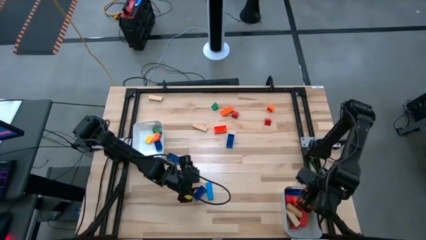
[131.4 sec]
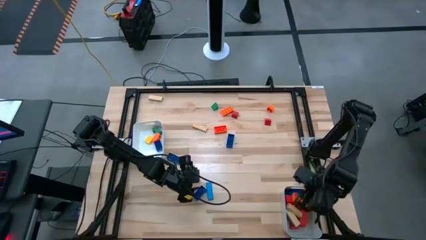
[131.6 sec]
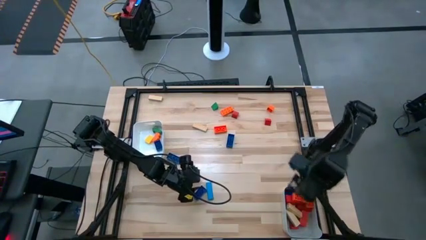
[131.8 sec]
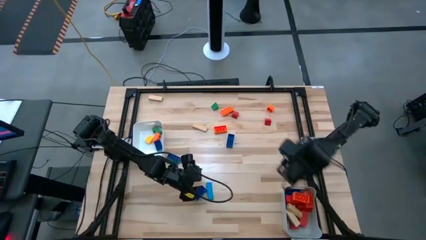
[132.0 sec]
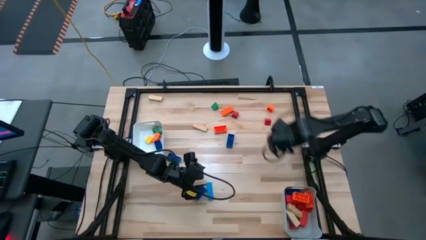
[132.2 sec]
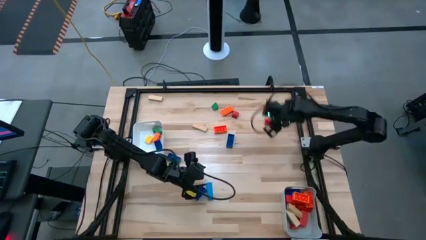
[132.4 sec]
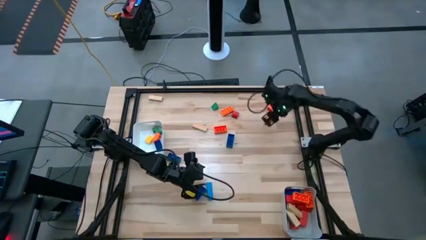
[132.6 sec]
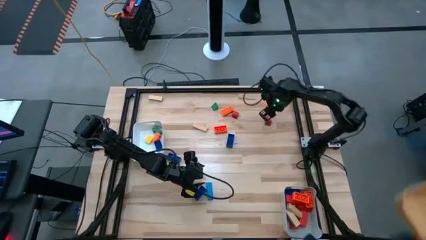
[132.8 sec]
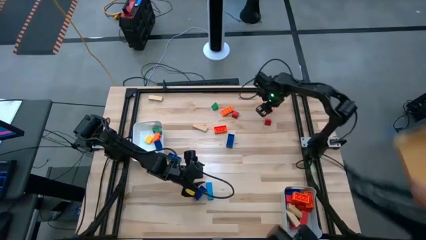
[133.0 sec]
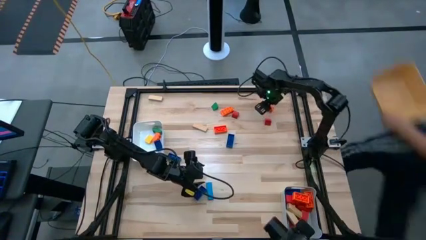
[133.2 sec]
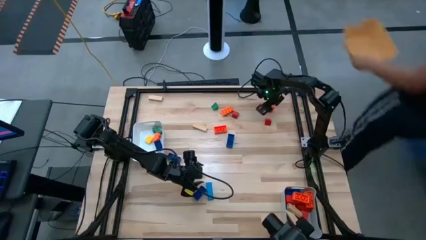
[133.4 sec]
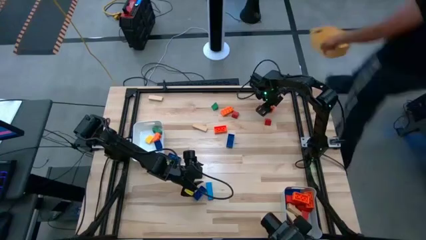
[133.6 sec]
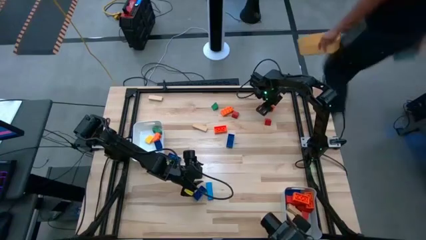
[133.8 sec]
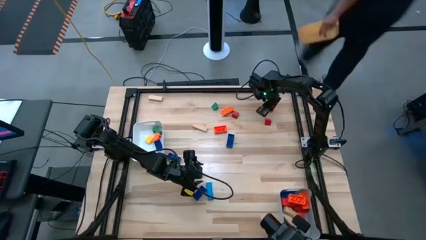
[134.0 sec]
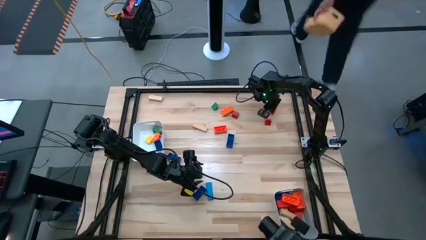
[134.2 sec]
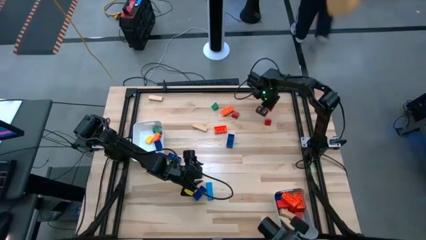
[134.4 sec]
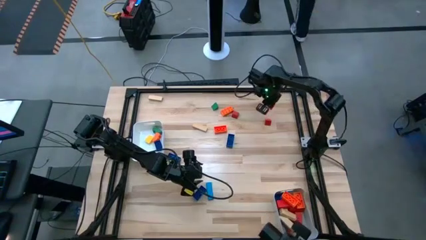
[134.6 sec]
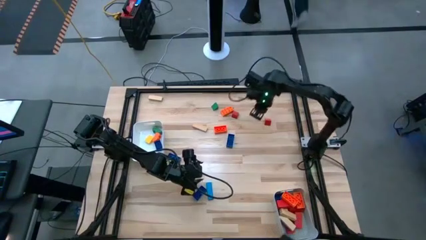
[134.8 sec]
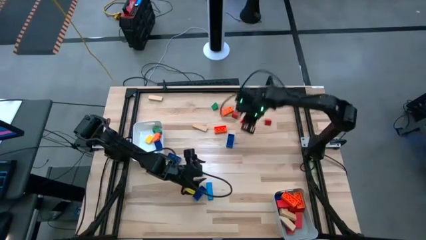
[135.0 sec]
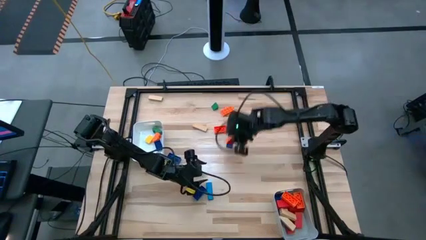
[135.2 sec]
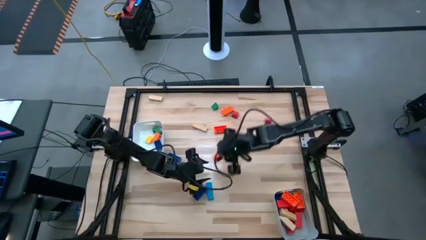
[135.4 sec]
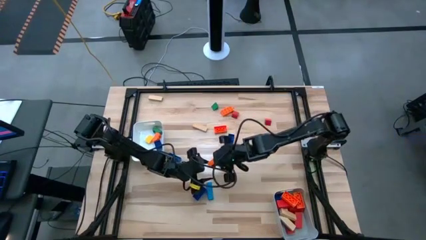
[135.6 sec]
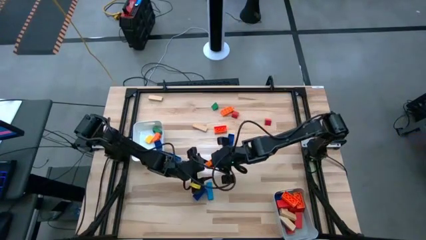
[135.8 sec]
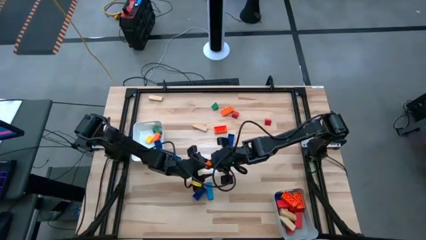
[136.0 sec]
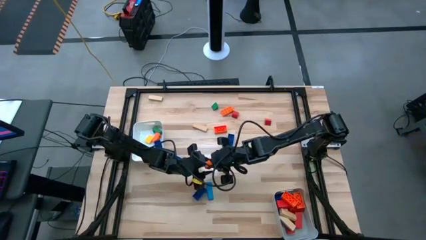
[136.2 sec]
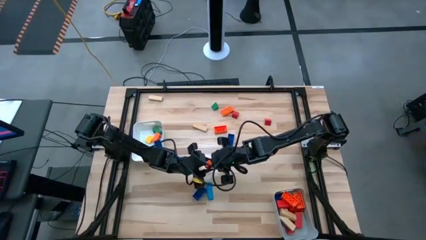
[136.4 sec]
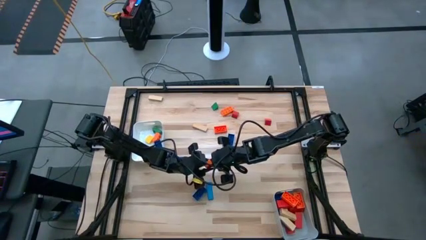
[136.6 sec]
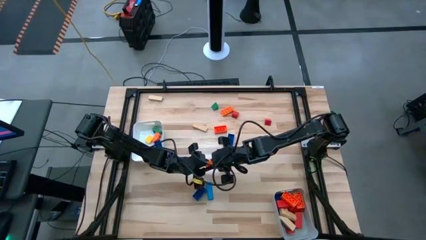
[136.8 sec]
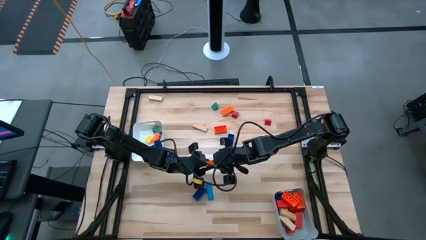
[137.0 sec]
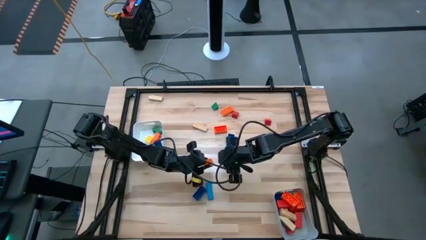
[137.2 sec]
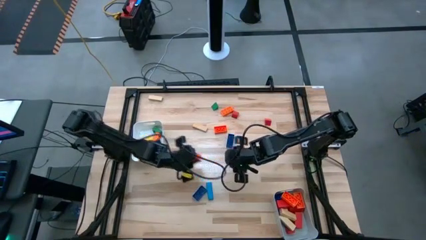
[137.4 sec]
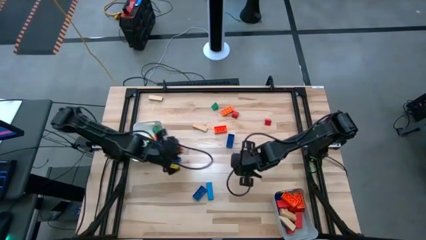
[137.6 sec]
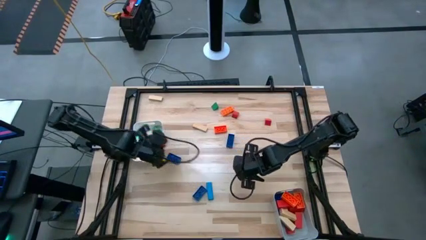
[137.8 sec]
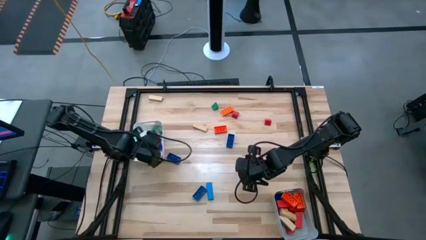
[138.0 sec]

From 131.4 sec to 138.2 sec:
Task: Sort blocks by size
Put the orange small game piece into the white bin

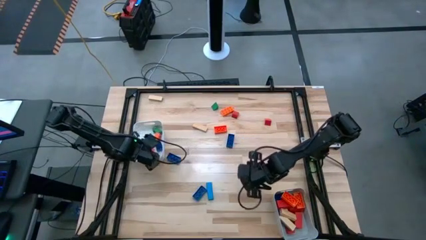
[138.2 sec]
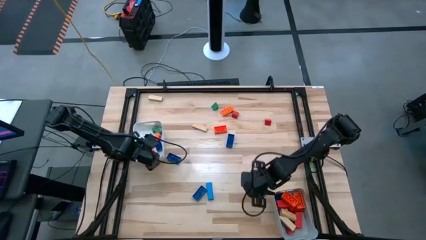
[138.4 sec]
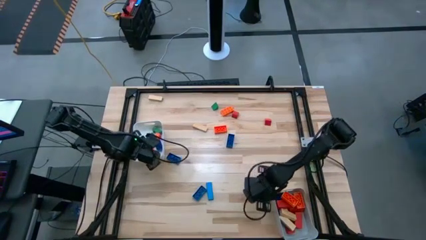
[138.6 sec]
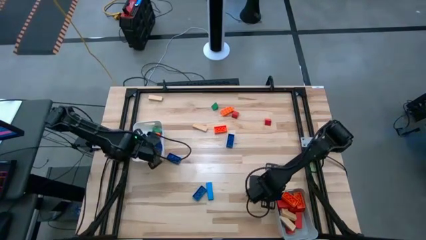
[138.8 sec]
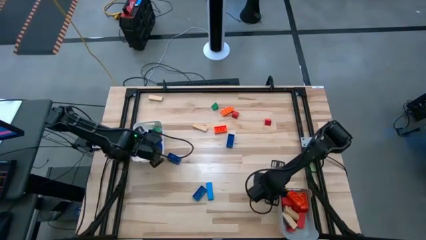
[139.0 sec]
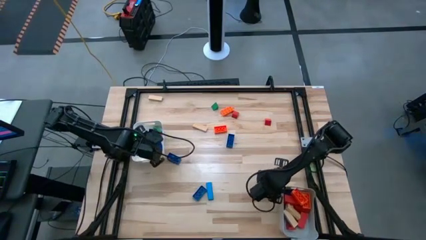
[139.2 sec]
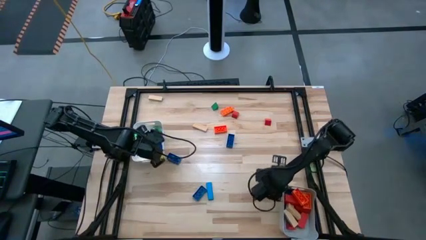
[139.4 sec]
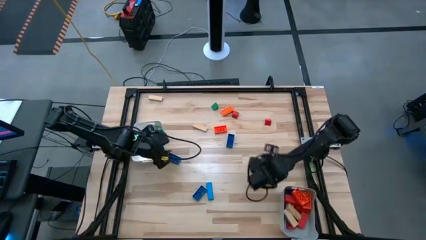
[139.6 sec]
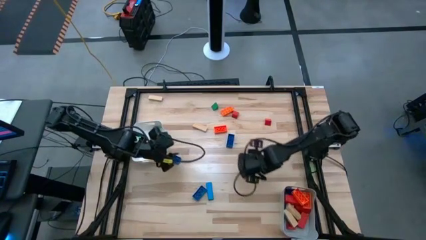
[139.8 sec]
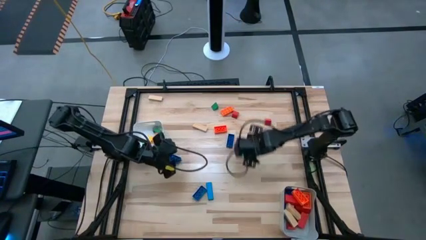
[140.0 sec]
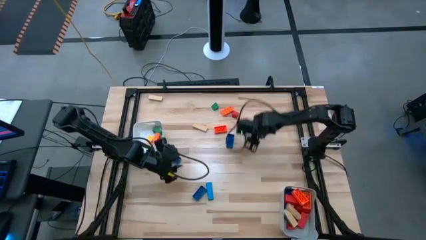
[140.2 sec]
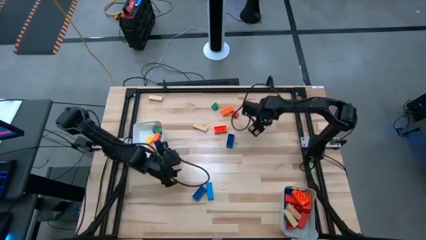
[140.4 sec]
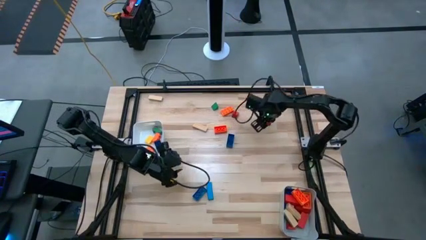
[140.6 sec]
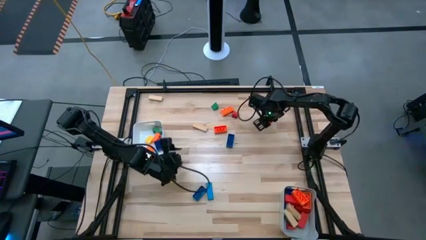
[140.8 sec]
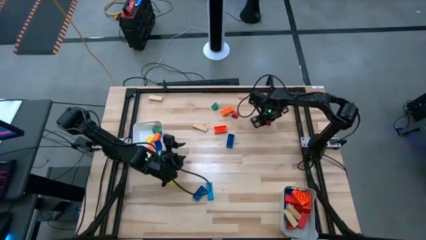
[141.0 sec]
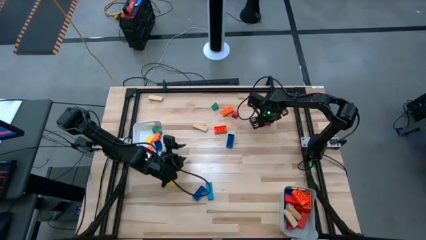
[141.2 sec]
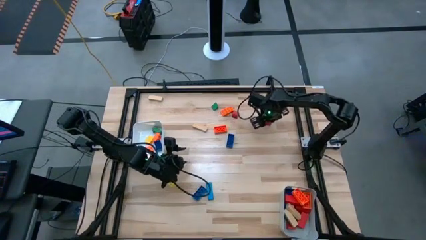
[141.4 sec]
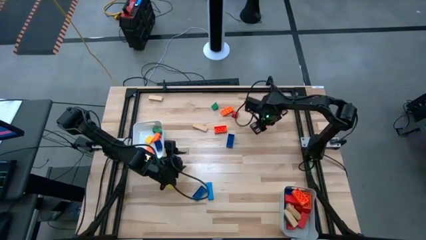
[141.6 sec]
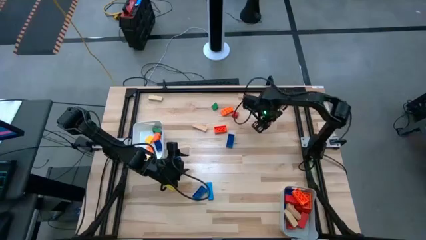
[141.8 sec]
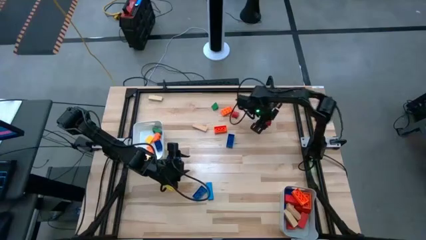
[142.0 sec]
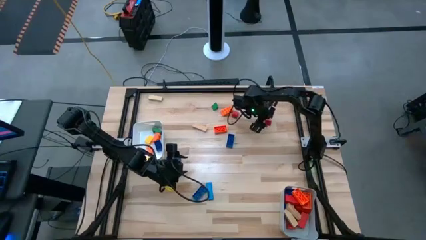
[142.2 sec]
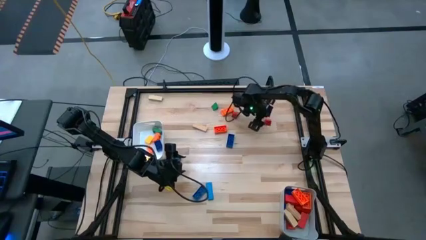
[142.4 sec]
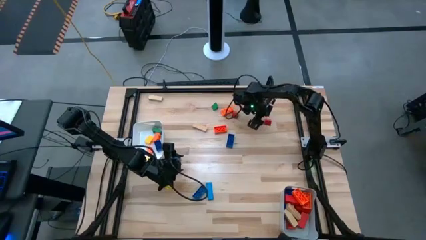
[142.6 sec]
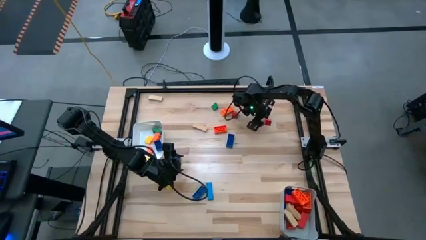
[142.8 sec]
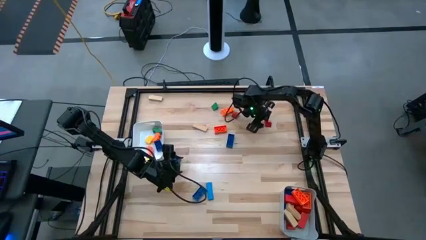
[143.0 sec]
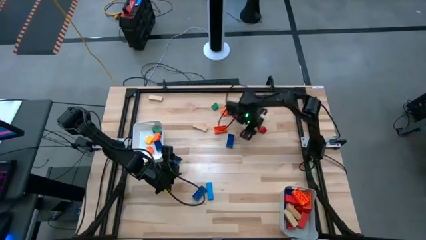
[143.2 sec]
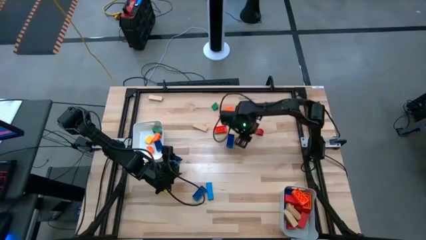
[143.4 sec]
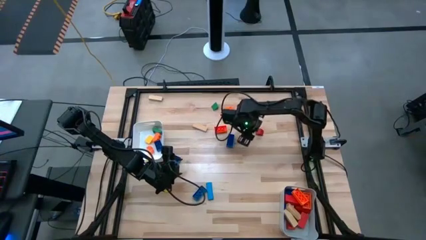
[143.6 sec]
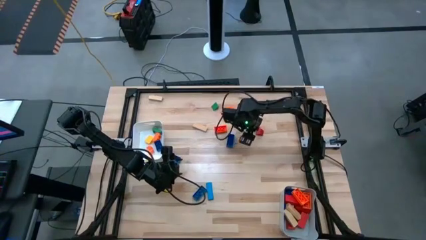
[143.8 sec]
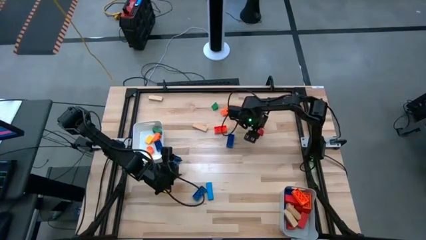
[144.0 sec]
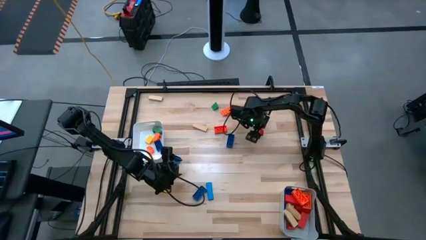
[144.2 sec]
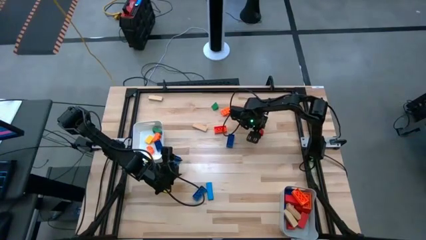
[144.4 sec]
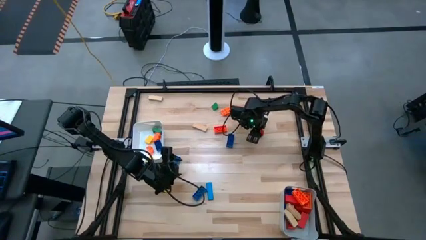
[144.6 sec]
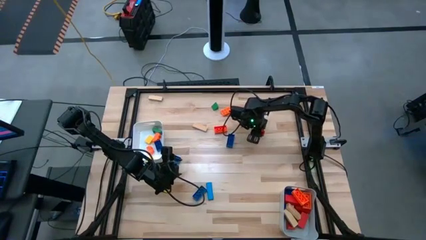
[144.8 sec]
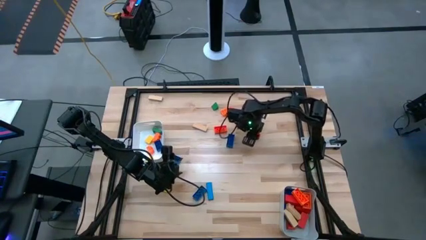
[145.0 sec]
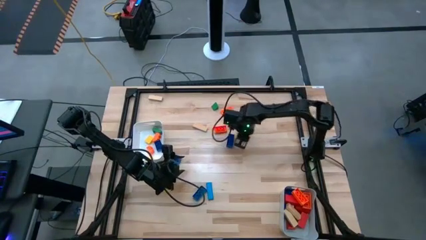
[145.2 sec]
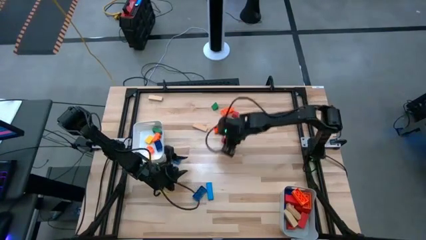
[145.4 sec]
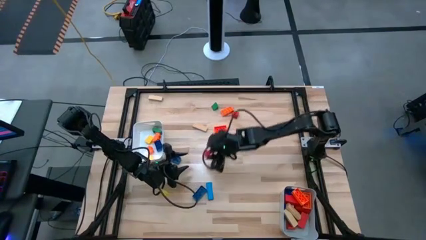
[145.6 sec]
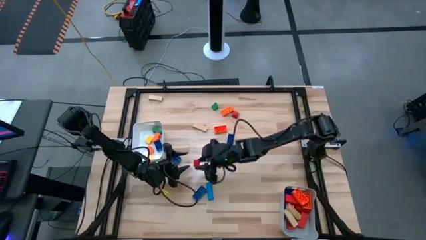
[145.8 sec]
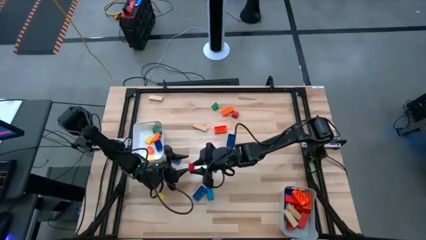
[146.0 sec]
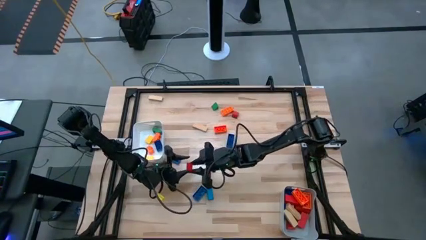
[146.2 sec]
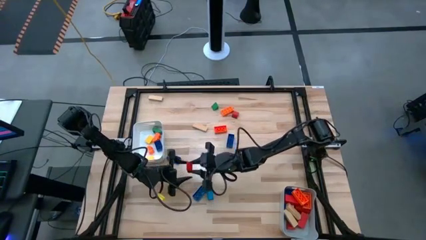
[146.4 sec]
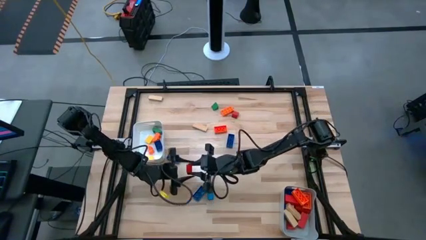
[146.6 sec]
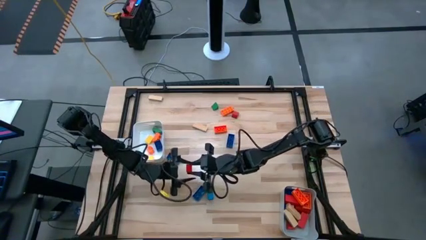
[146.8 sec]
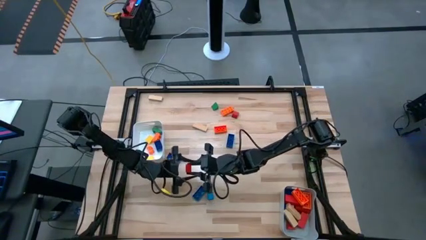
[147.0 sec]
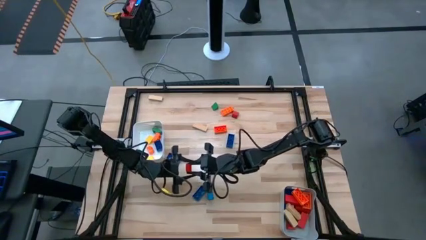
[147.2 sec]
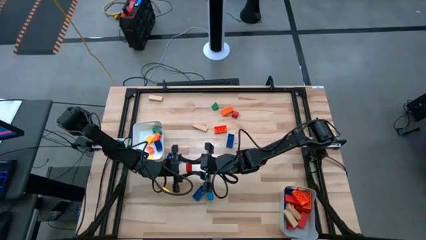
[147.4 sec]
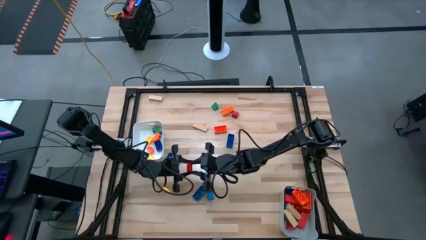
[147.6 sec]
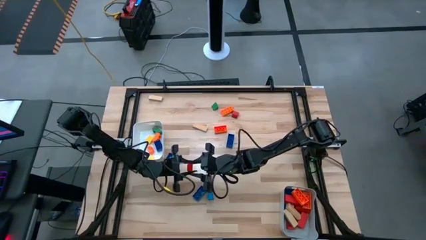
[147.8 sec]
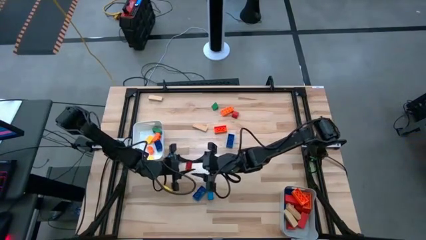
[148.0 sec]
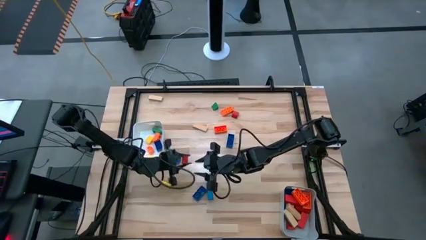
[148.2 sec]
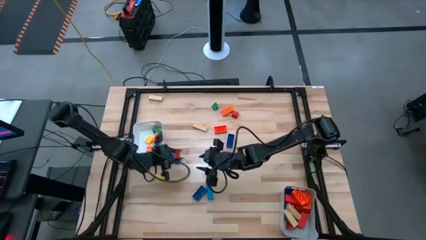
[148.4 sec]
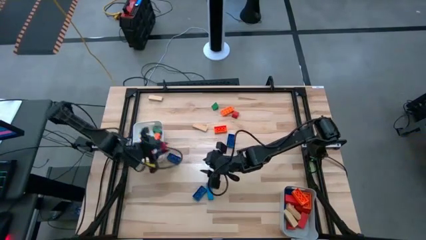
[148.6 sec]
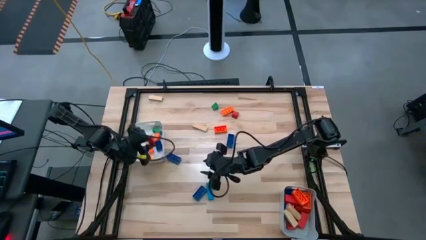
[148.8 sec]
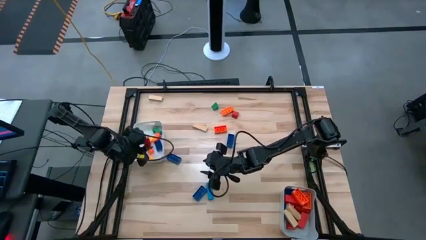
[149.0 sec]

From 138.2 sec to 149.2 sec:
Put the red small block into the white bin
